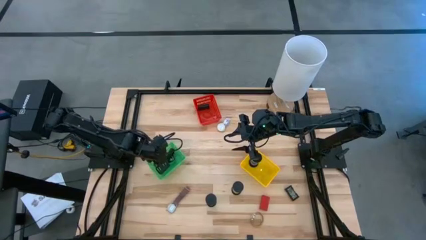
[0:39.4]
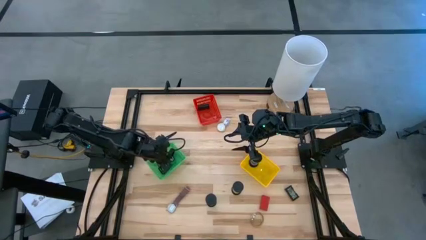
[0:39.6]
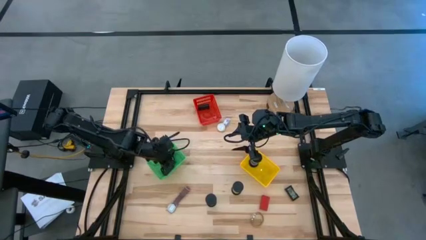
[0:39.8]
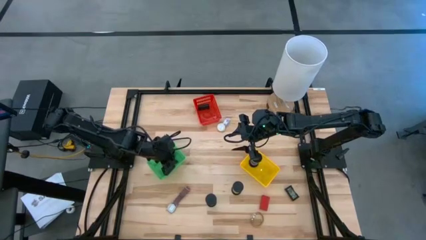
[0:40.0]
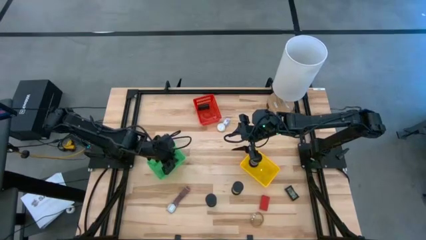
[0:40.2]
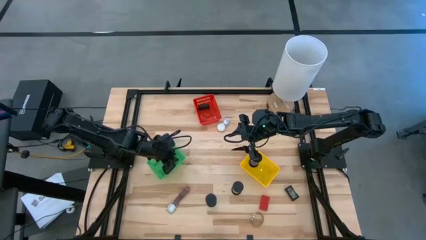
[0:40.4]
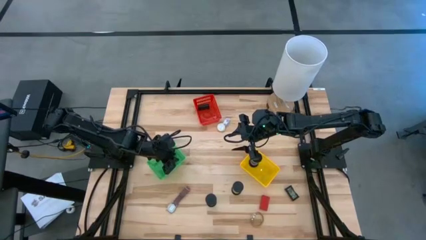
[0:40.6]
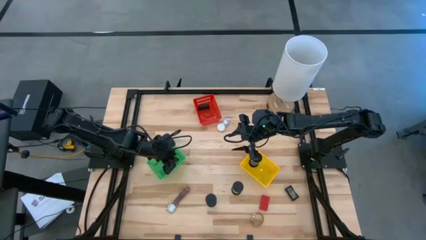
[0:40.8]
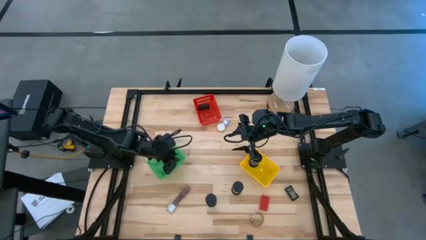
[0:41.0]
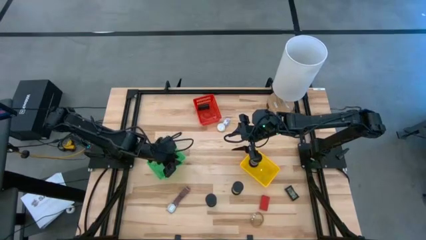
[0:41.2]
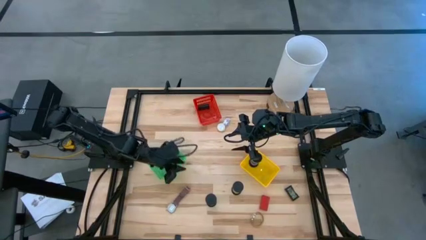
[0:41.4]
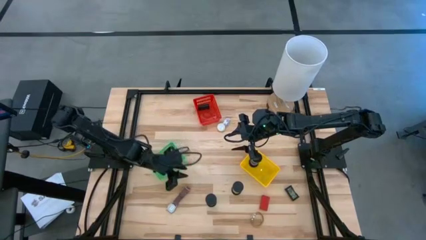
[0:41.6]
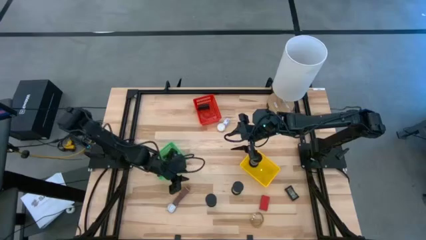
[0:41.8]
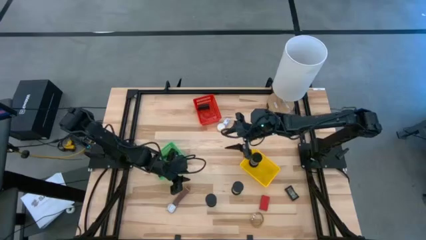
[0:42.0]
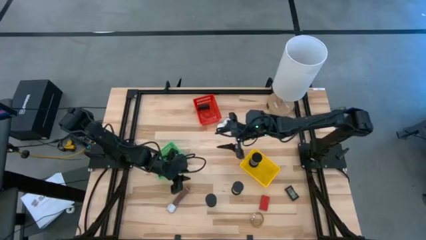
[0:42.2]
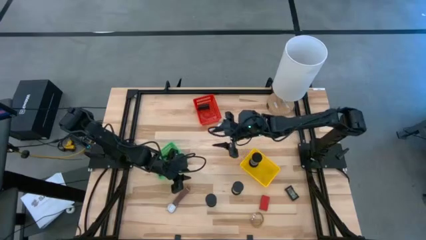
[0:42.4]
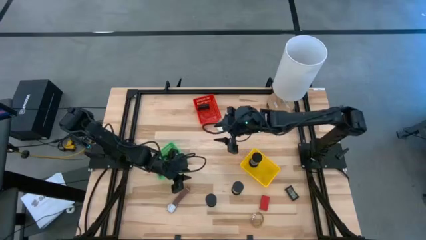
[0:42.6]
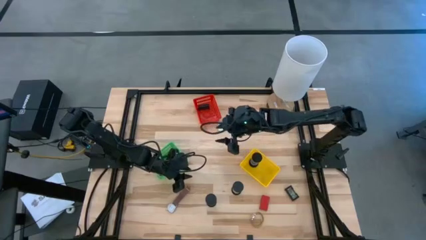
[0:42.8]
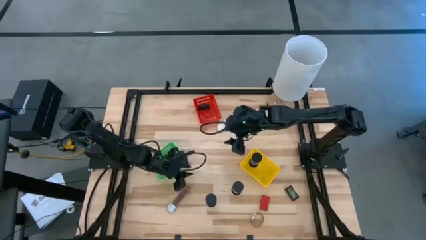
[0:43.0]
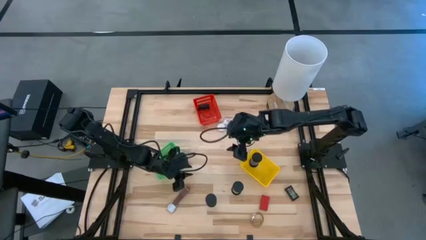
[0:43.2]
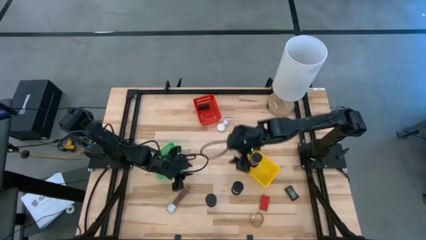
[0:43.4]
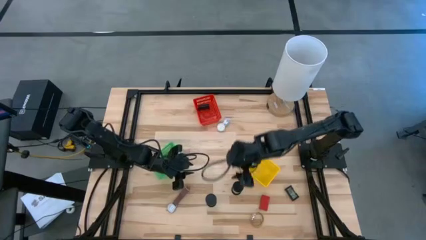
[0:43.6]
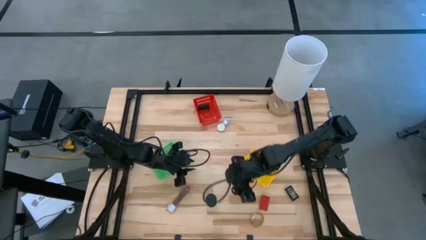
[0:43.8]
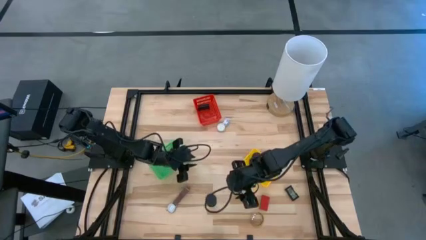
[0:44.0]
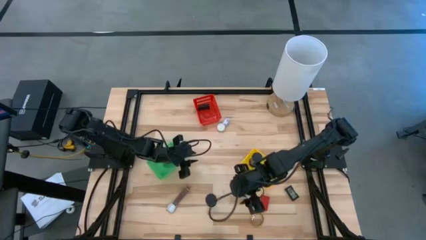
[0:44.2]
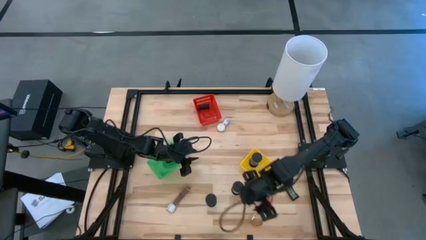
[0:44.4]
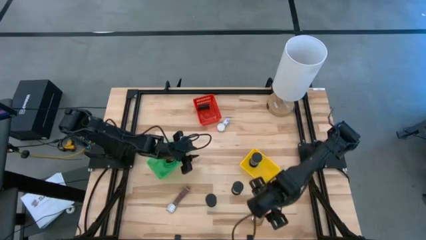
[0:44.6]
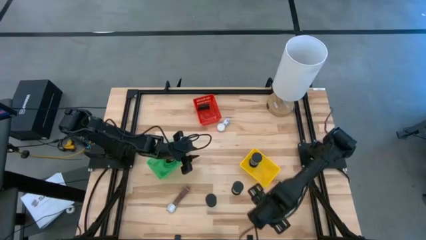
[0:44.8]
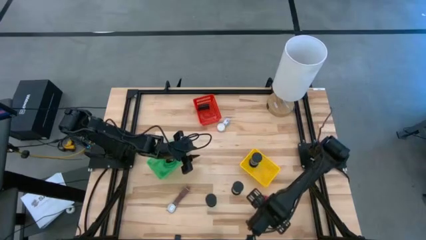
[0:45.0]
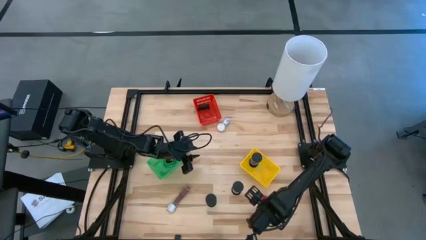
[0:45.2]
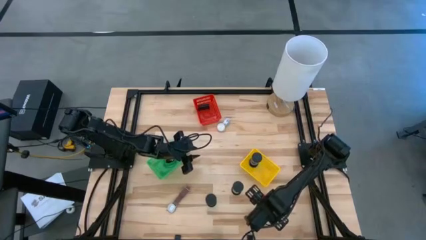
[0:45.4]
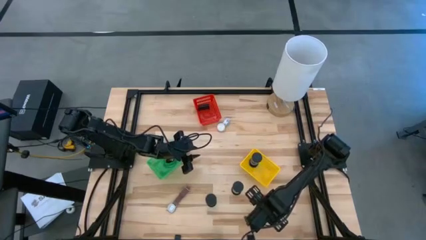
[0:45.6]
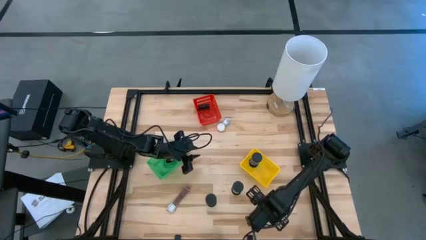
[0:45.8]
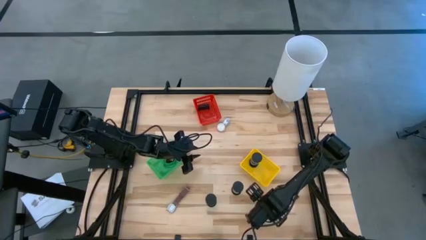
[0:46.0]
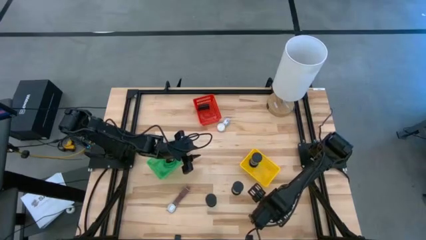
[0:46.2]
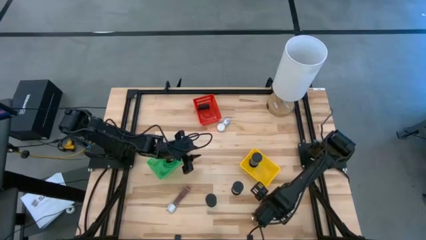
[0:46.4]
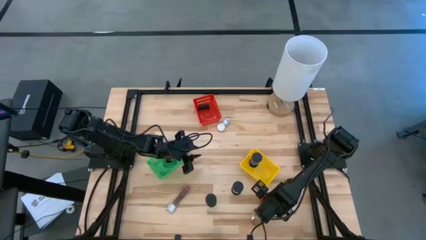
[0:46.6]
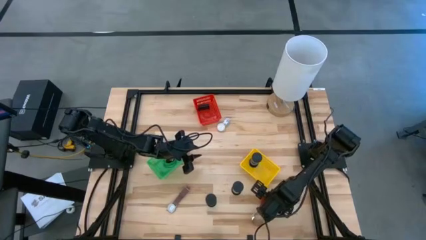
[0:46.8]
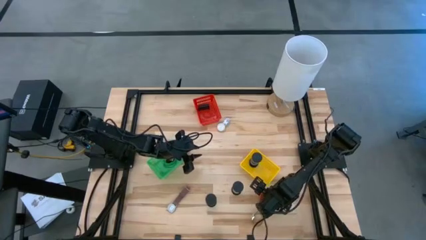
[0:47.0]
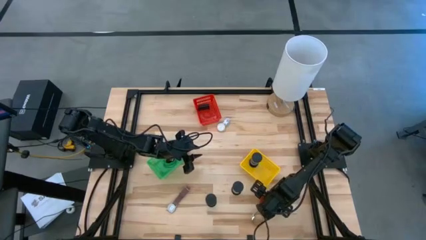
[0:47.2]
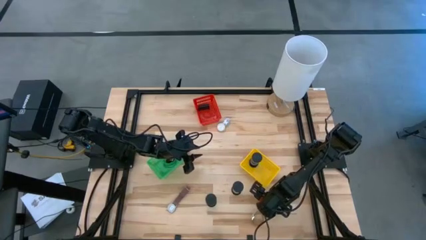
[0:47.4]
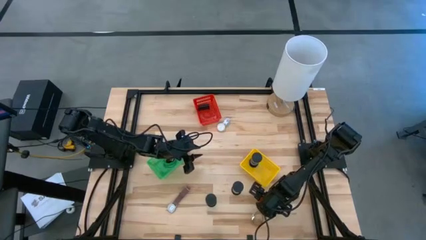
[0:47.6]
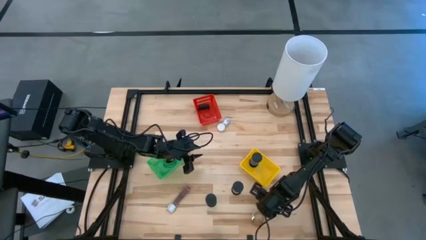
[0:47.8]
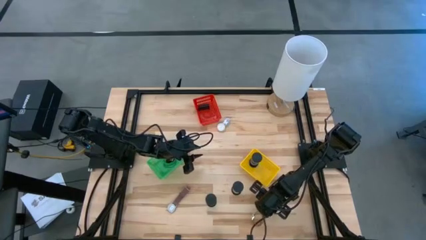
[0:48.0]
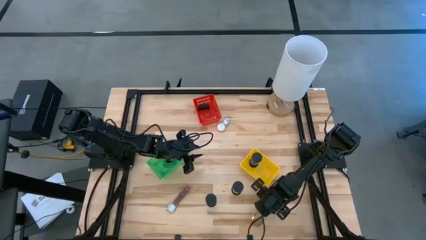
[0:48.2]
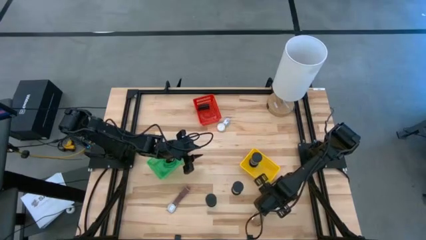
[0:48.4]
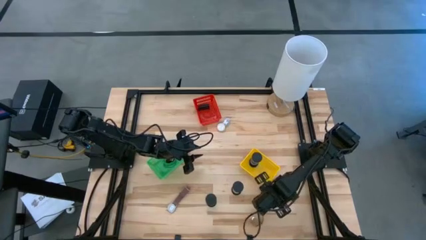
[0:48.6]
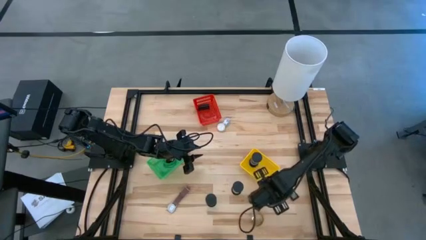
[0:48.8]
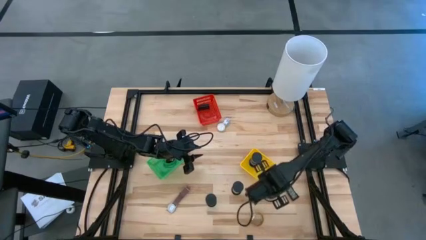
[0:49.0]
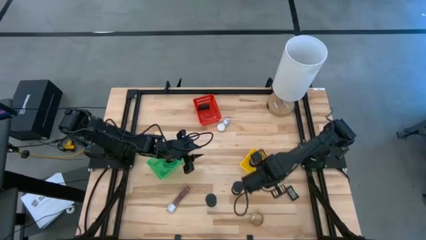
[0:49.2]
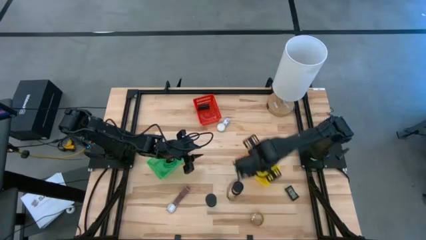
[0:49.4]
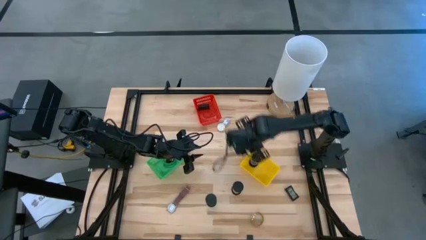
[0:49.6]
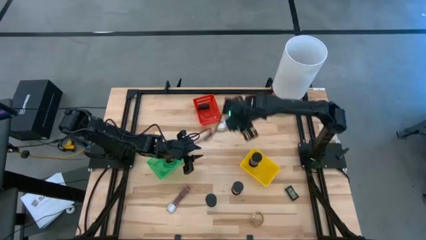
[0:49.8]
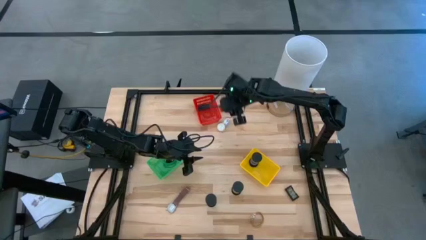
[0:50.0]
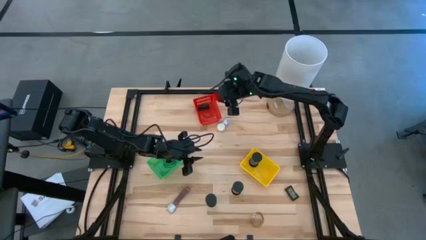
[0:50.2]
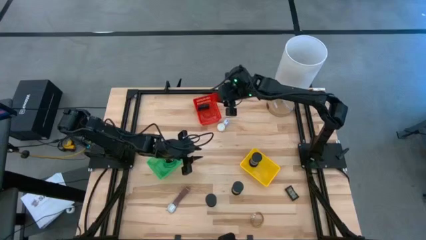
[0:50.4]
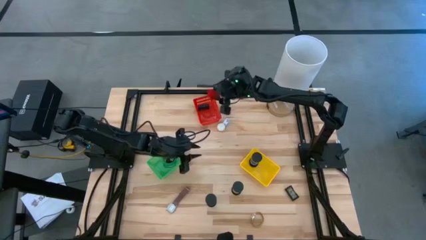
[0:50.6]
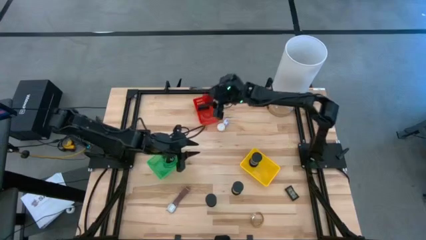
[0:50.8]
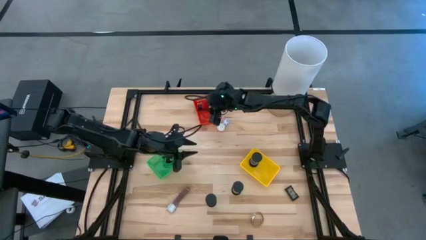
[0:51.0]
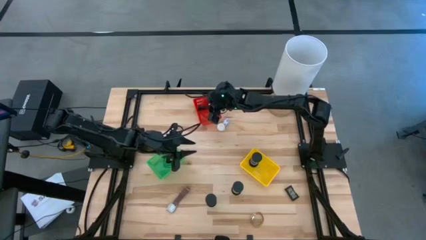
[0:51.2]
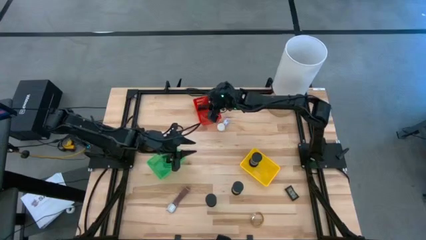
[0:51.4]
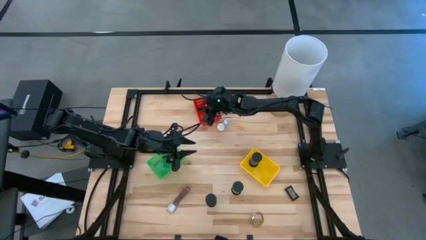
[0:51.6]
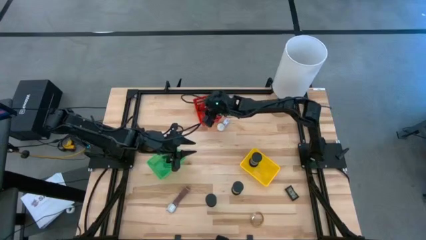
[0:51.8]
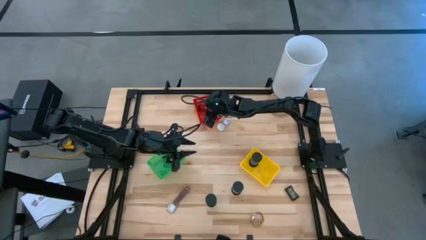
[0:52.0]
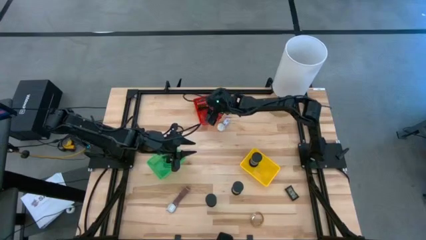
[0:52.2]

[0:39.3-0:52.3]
Task: Pick & Place Office items
Put the red digital clock into the red bin
